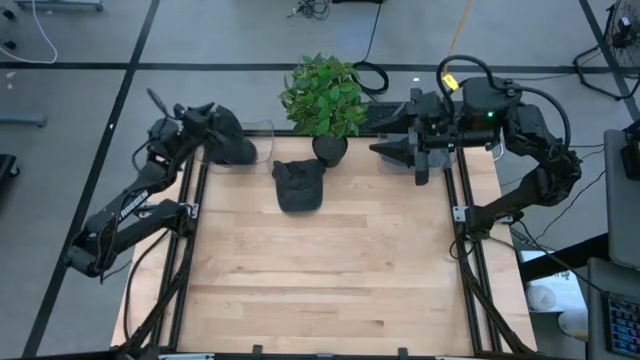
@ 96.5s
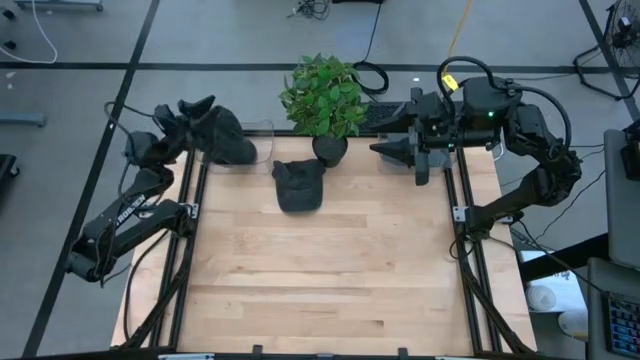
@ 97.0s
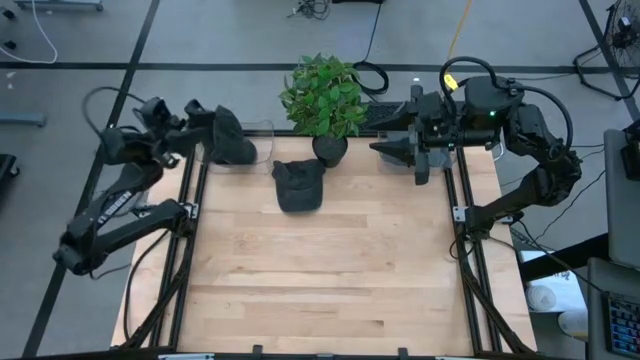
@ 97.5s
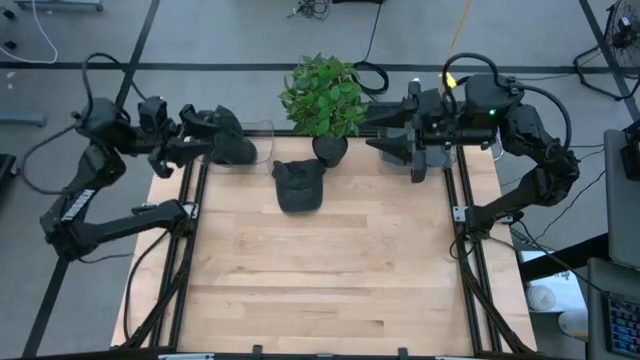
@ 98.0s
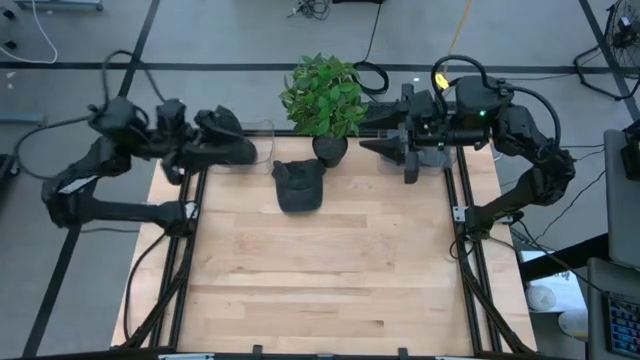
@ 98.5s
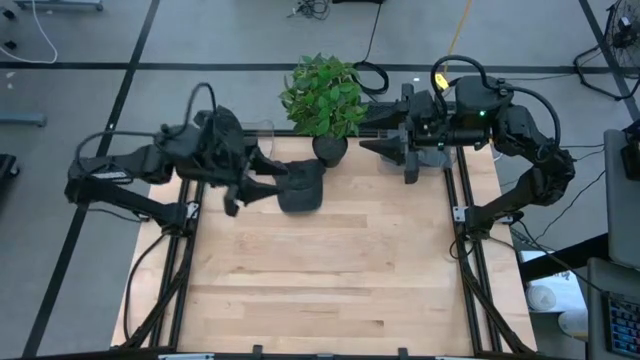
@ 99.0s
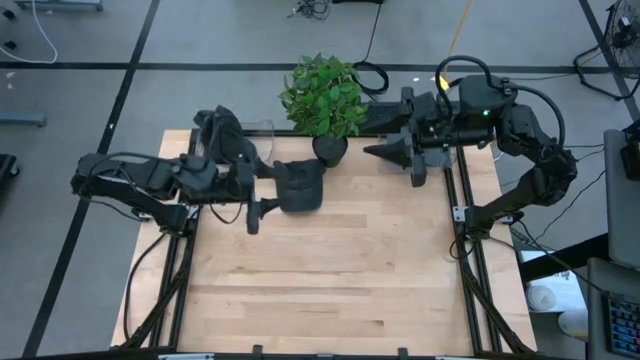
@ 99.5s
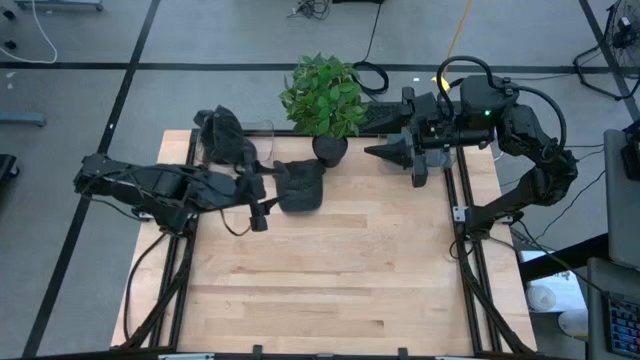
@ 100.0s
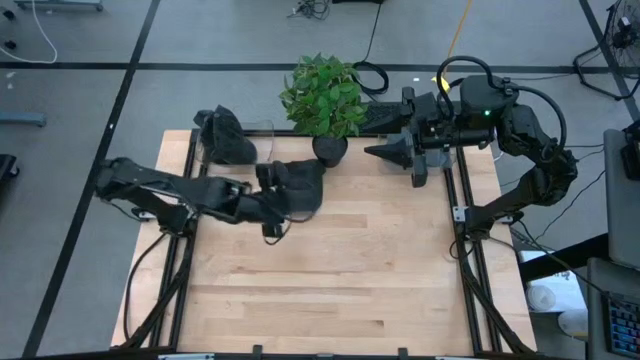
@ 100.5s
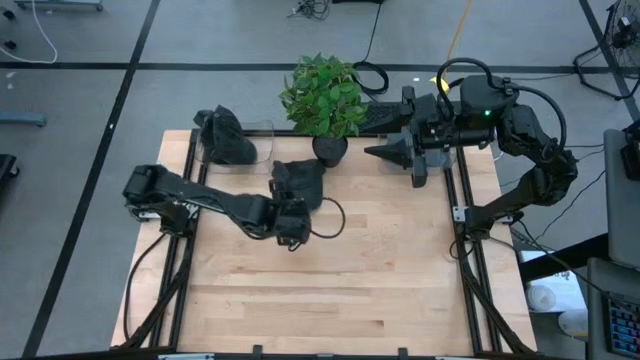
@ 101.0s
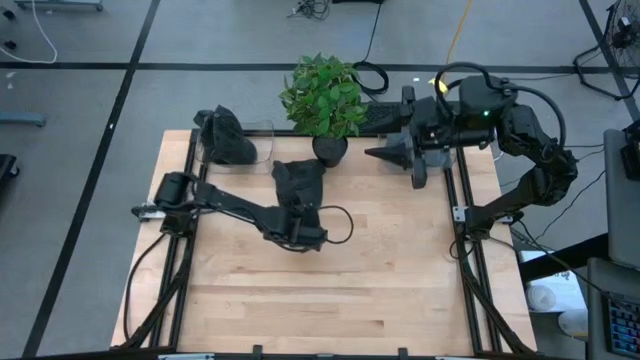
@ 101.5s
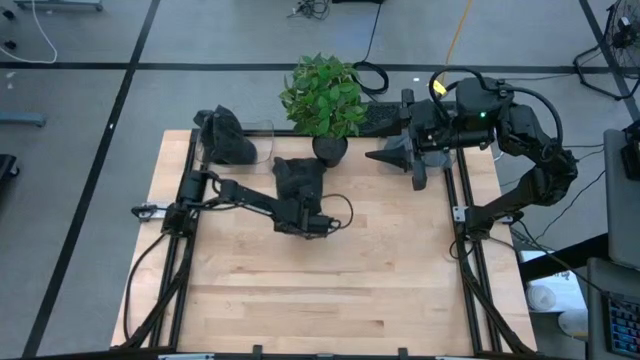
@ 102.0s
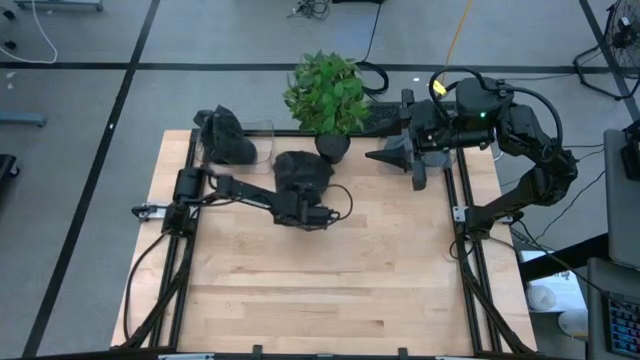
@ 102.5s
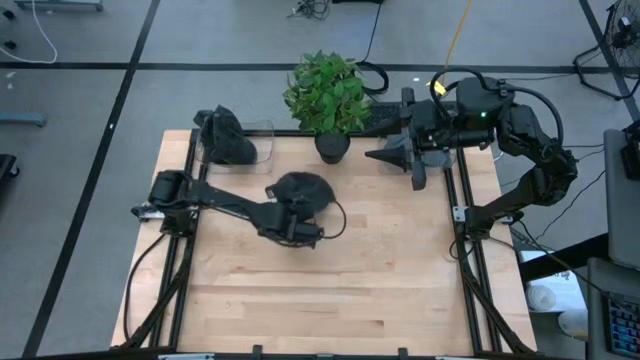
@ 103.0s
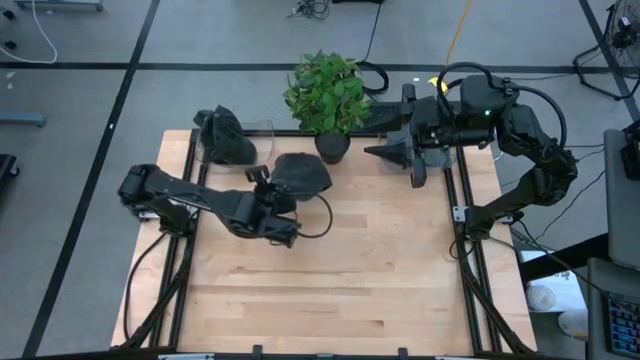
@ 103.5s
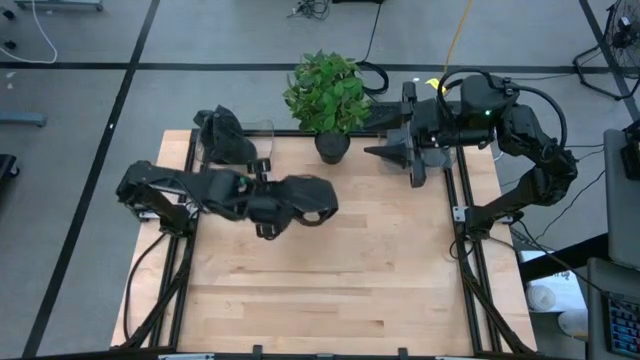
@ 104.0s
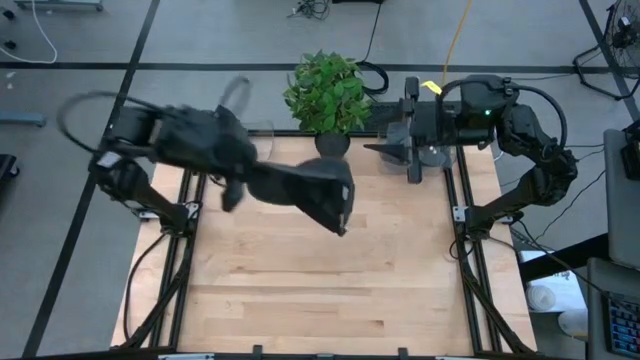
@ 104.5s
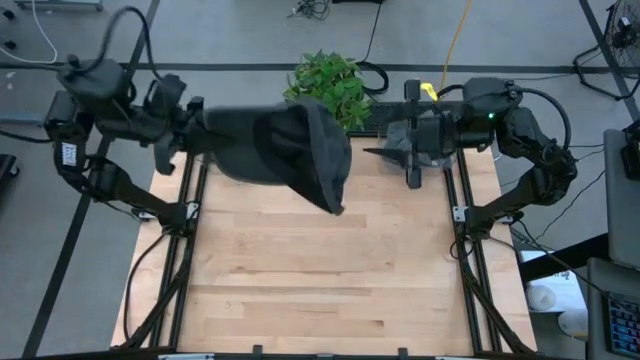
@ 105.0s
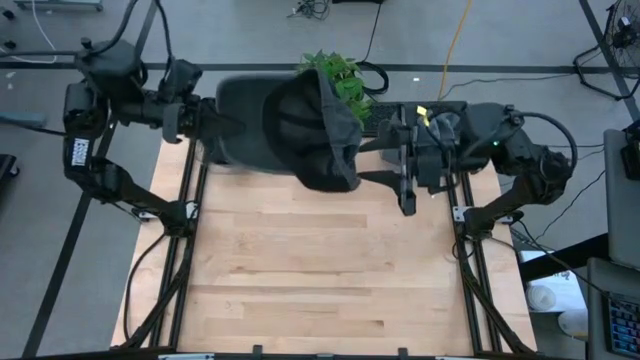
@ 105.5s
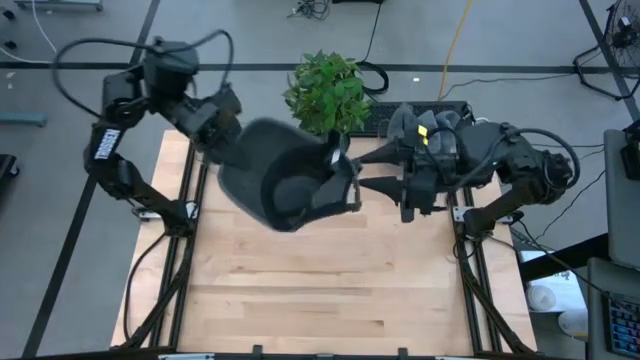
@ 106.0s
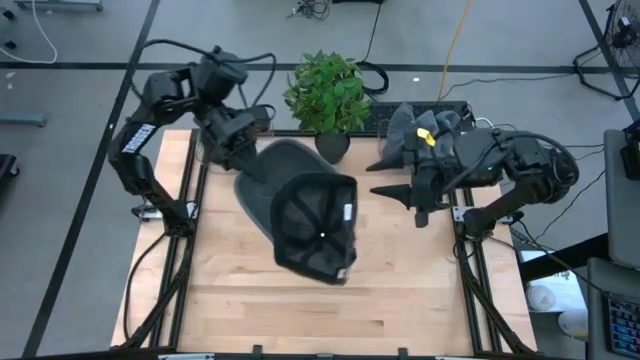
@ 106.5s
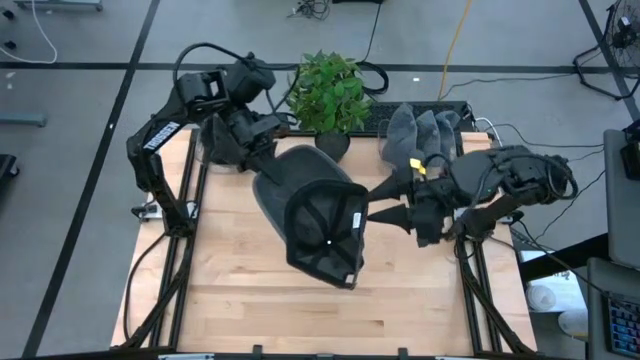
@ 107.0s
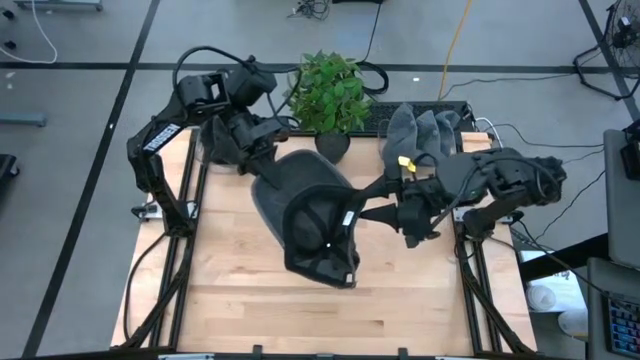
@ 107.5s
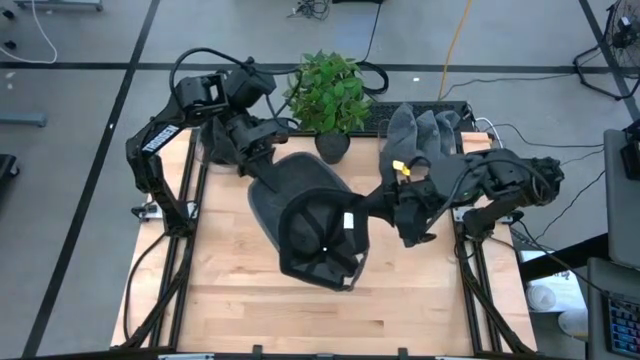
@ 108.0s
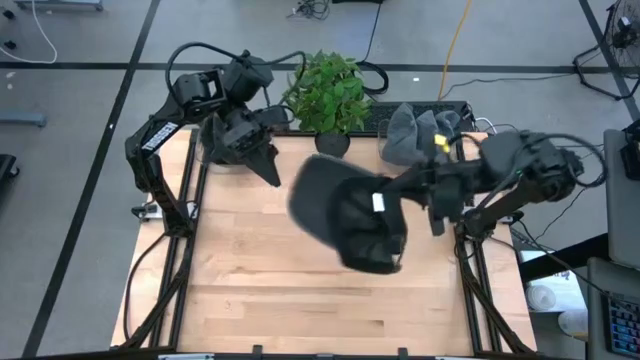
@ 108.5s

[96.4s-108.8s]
Task: Pick & Place hat
Put the black cap into the left transparent bin

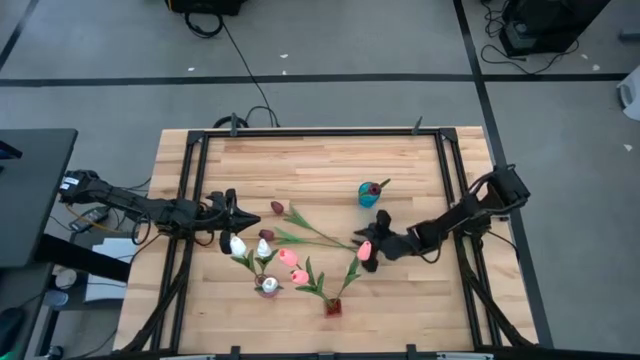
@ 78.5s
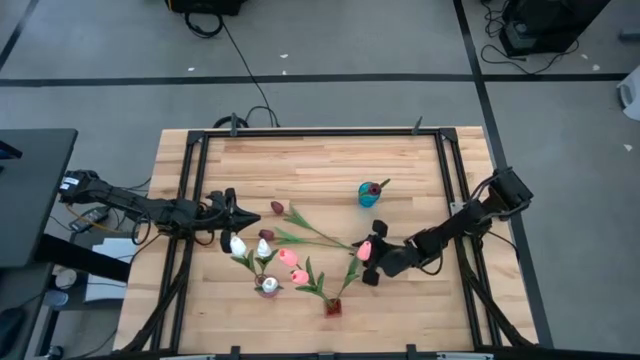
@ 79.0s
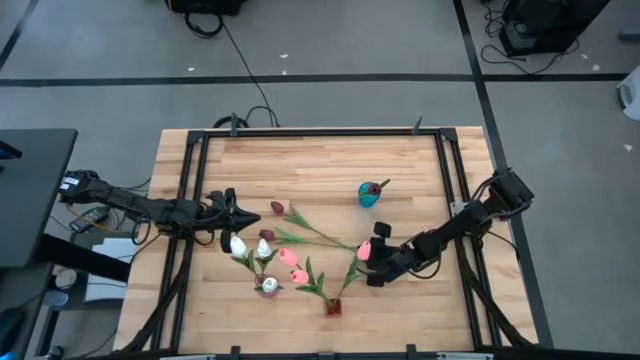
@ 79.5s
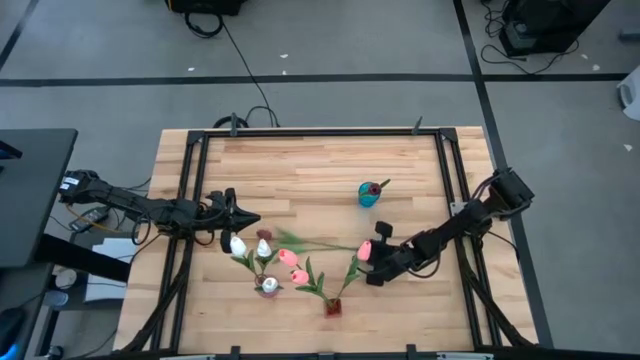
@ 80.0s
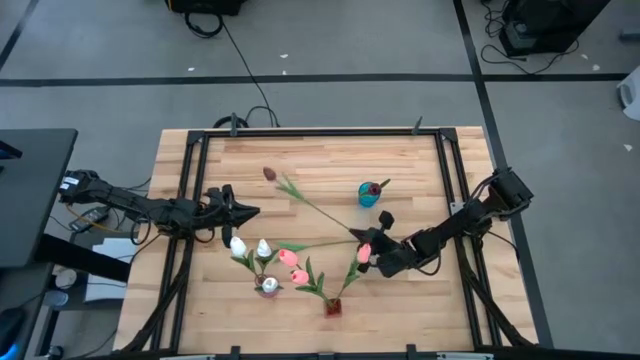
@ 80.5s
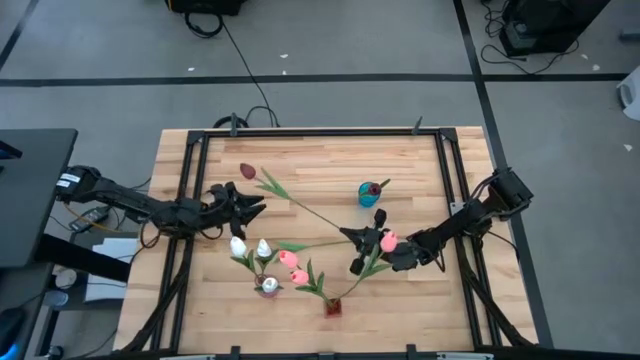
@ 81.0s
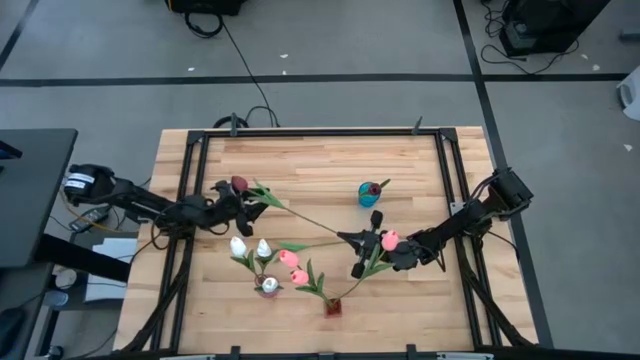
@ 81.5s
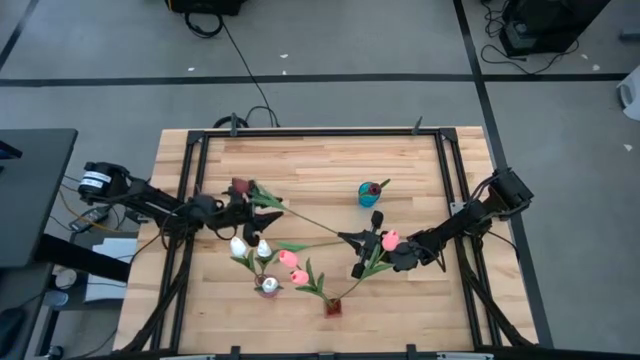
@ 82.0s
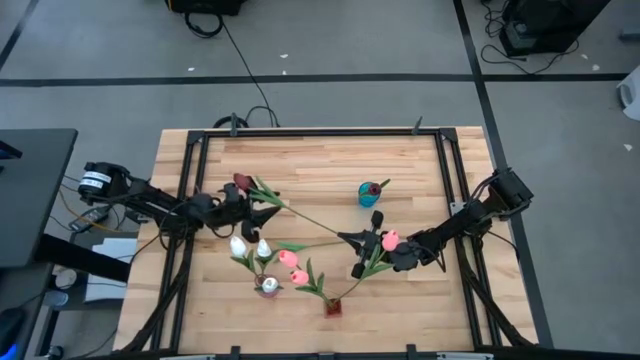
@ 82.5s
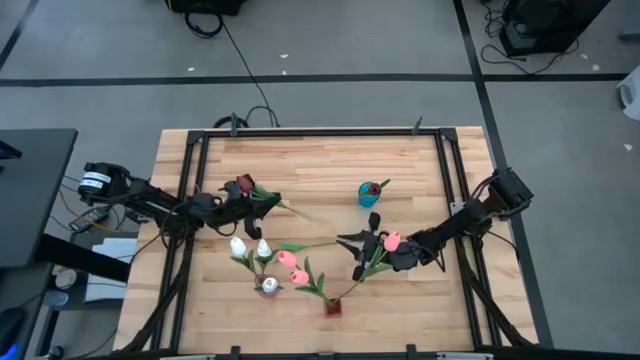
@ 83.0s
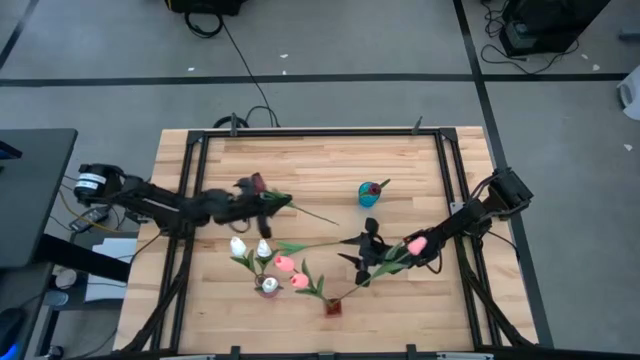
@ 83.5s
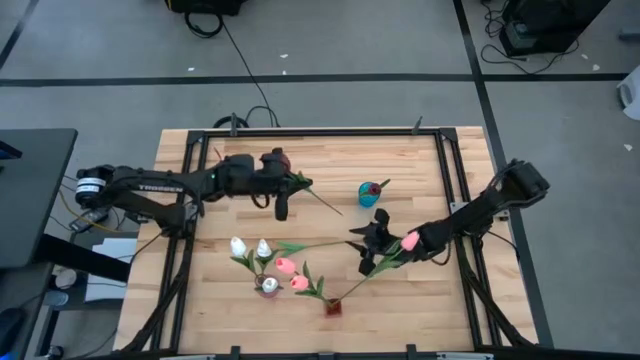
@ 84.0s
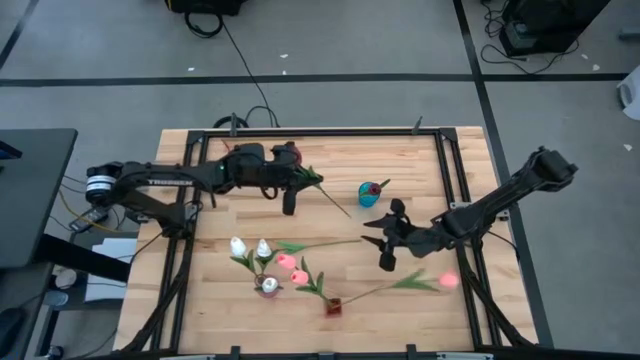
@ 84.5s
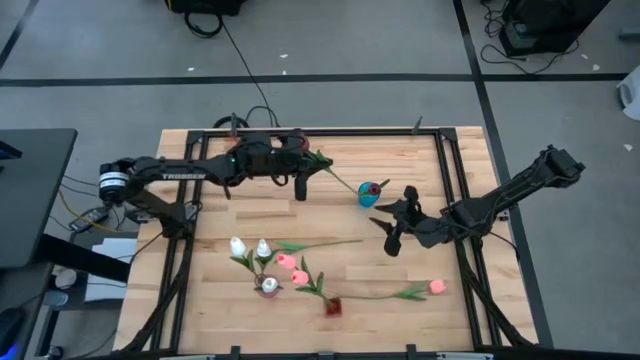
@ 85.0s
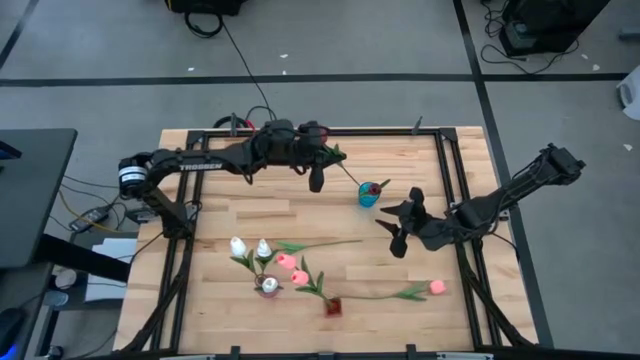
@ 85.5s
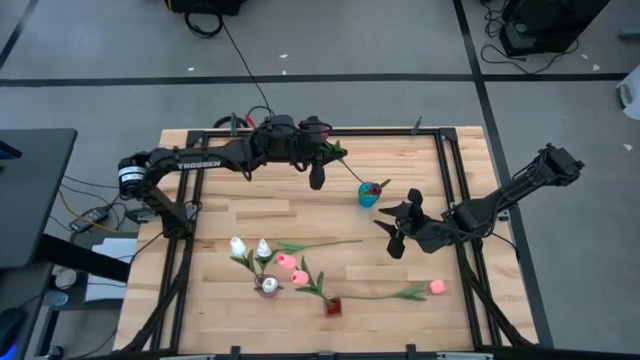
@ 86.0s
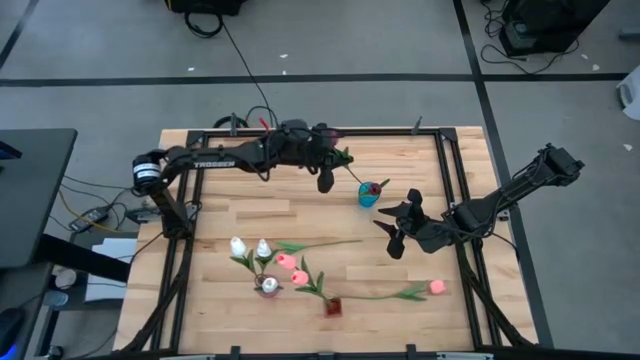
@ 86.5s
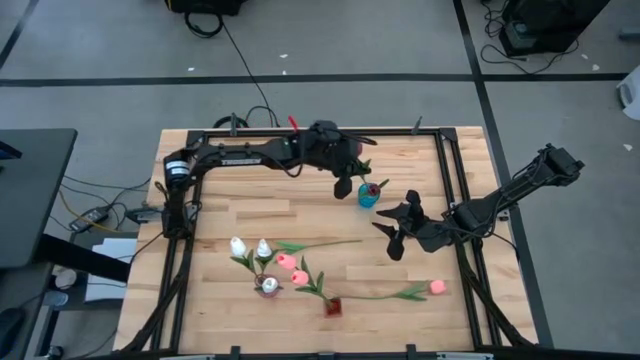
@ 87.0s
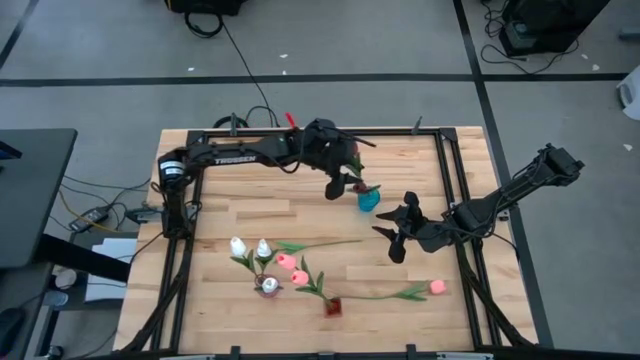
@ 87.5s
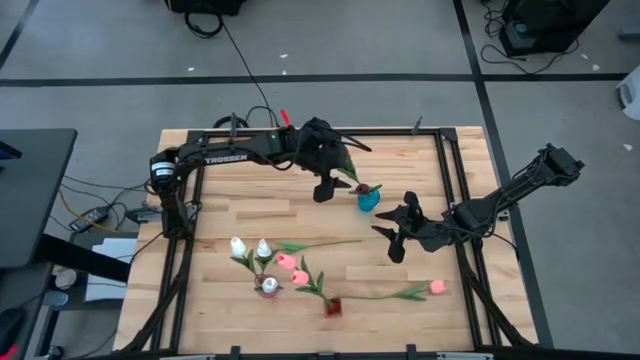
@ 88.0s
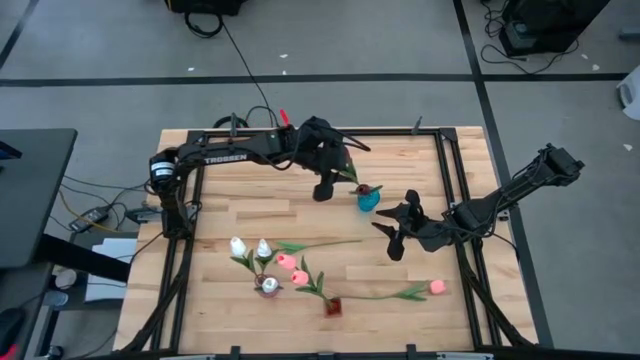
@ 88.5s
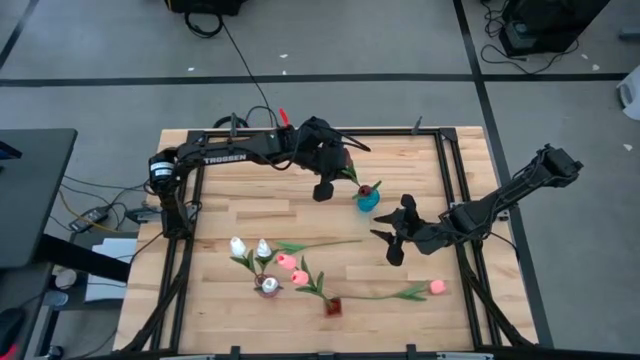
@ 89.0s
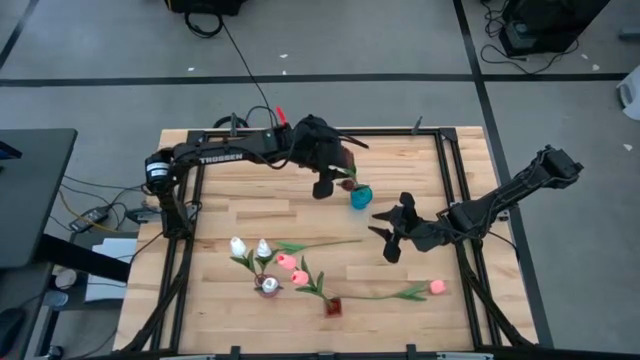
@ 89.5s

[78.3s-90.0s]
Task: Sort flowers into vase by color
Put the top red flower into the blue vase
